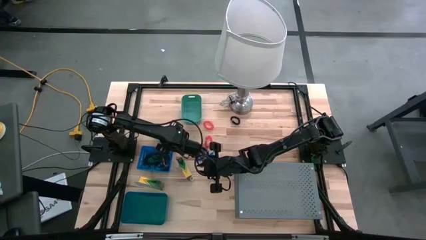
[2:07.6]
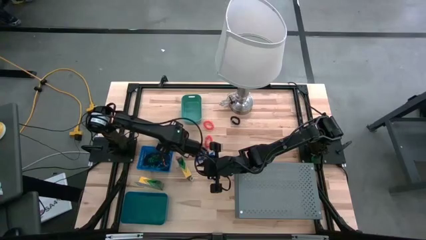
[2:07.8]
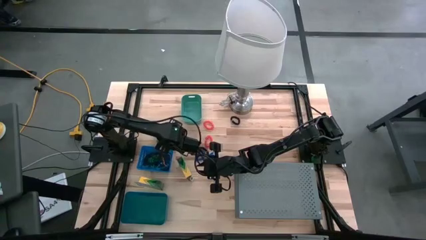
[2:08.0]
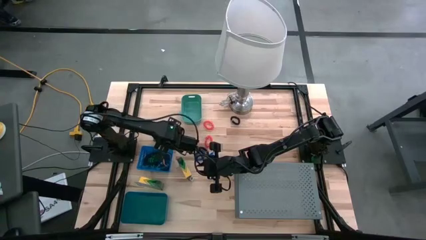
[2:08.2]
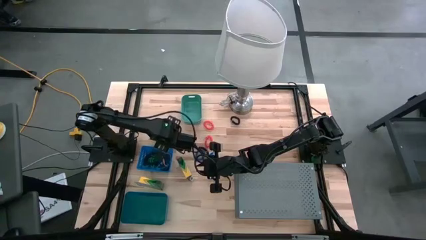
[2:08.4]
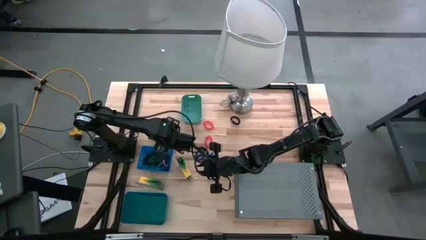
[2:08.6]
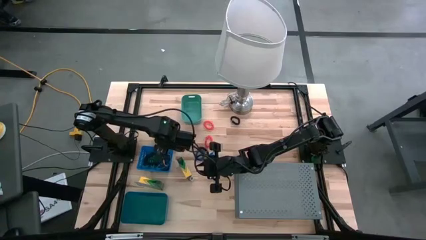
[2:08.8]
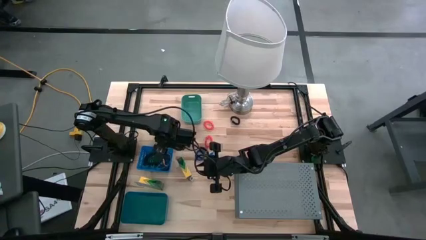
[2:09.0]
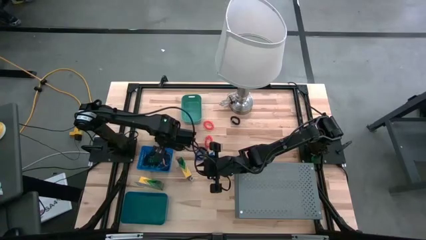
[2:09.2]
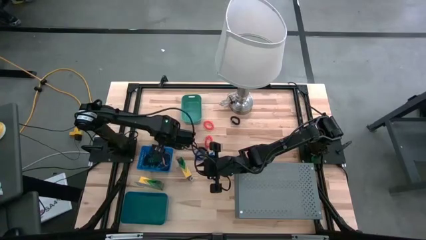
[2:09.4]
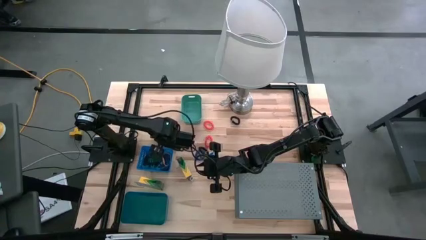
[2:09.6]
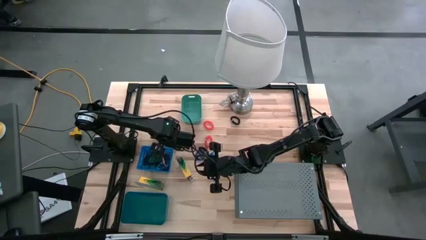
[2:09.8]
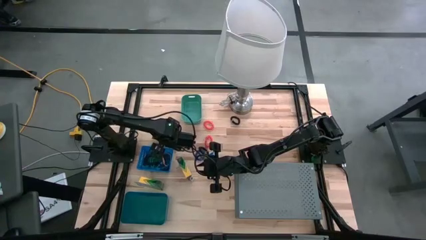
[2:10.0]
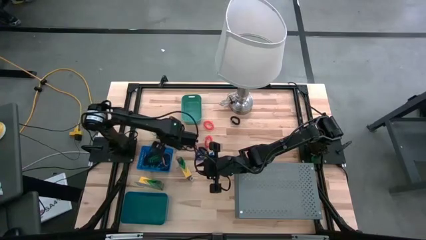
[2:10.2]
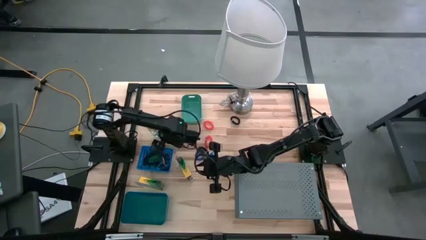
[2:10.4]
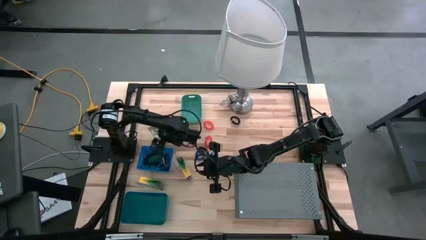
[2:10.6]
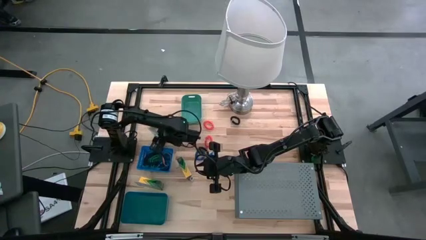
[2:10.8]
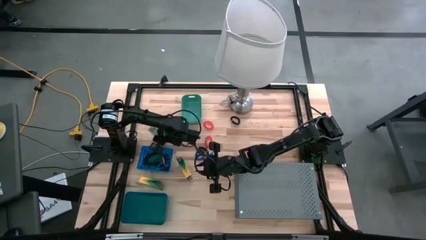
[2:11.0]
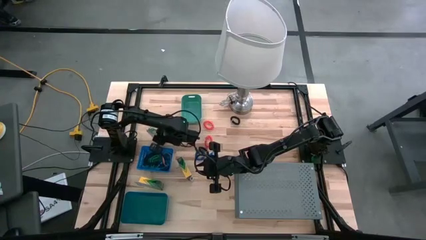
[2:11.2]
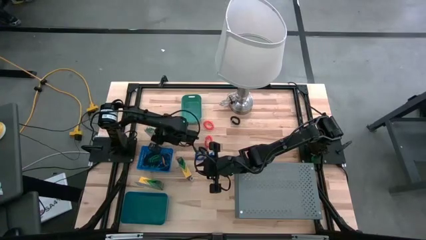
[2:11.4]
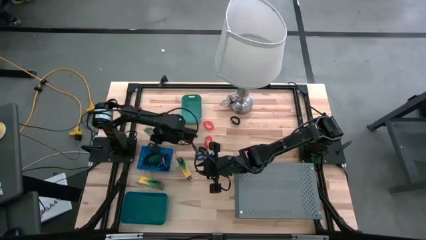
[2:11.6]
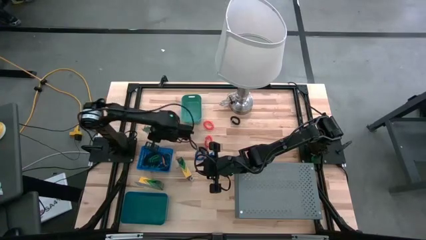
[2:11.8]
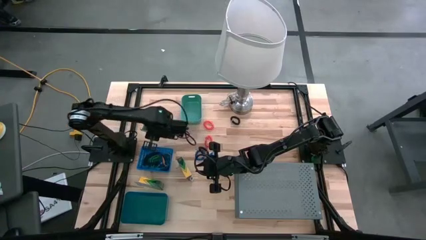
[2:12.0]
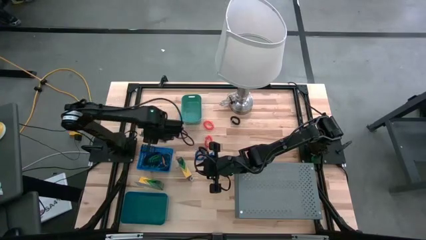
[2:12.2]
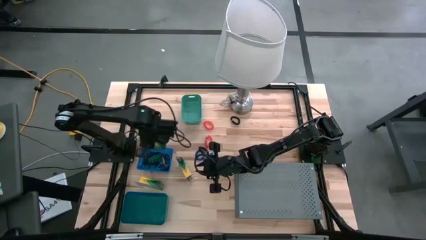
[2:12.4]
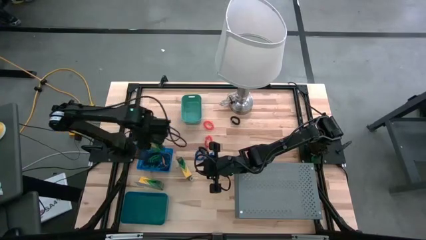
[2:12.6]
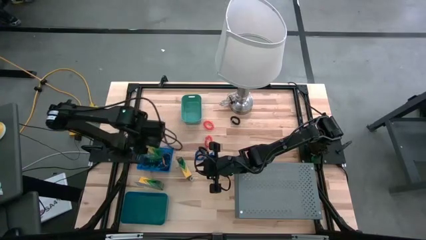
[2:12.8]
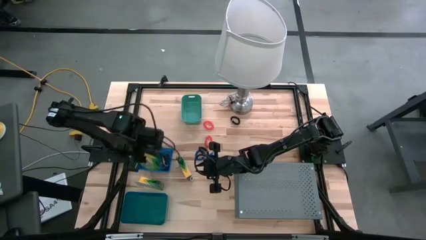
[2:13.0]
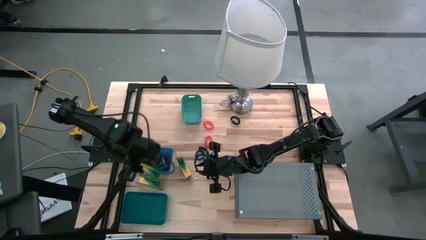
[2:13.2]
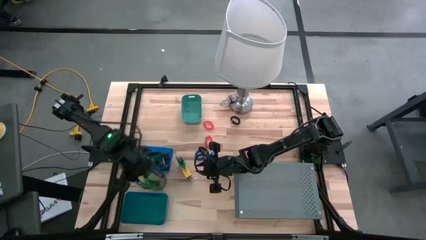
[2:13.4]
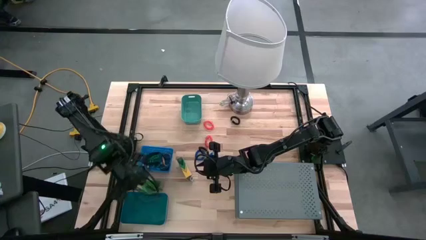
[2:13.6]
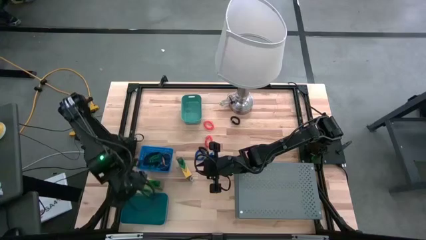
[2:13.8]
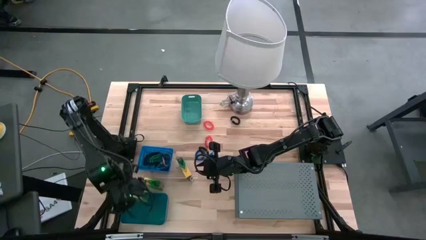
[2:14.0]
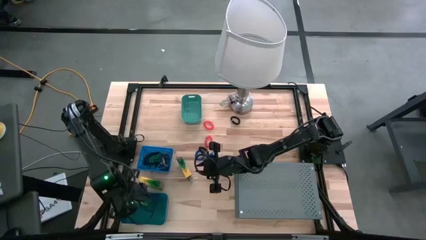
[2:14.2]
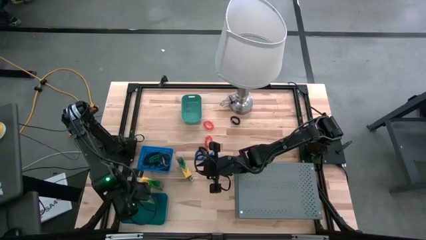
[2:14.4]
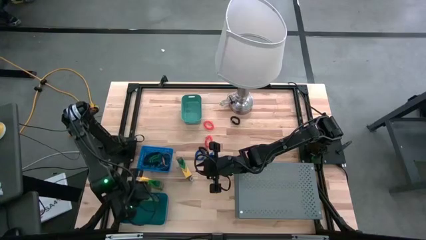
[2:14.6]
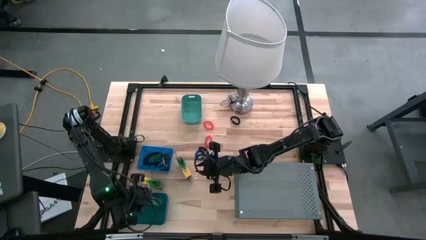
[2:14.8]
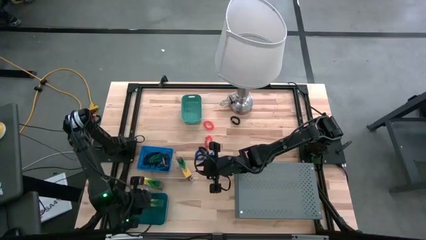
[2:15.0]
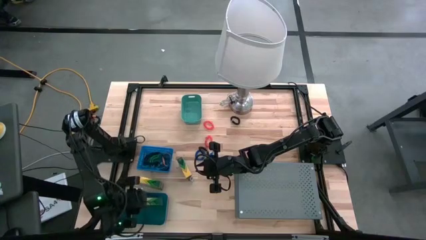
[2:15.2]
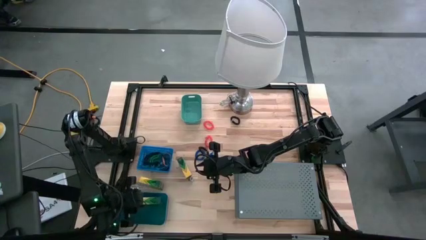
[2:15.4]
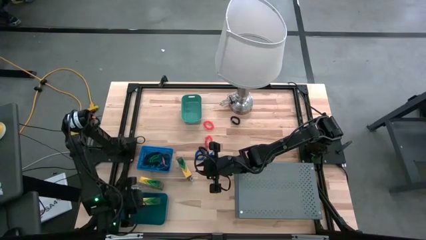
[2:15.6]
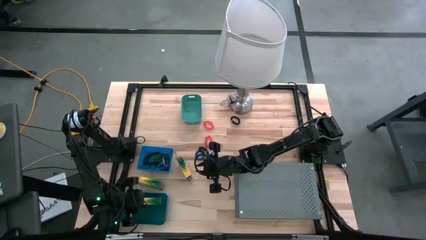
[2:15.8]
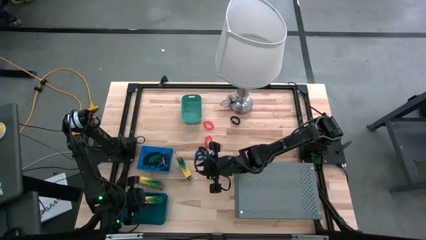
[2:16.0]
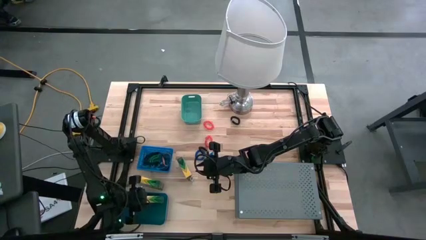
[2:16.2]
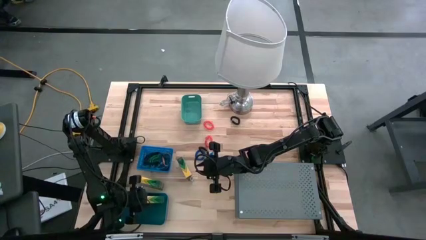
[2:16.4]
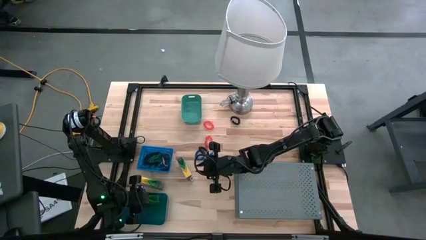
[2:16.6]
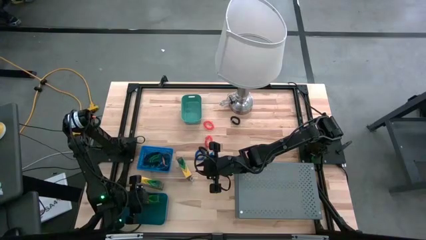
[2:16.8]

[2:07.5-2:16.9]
Task: Pick & Place Office Desk Supplies
Put the top pack of crayons into the bottom blue bin

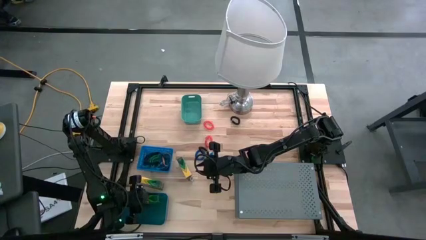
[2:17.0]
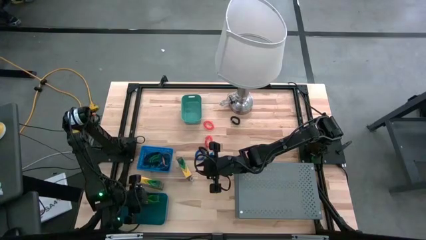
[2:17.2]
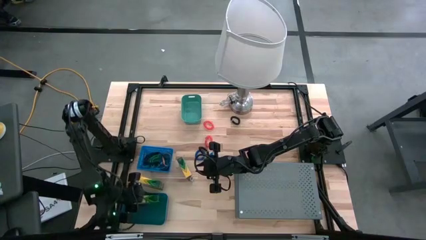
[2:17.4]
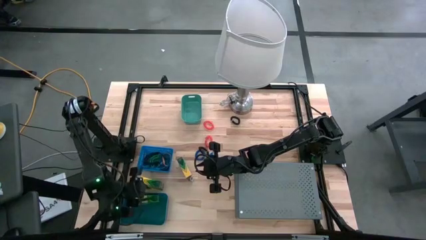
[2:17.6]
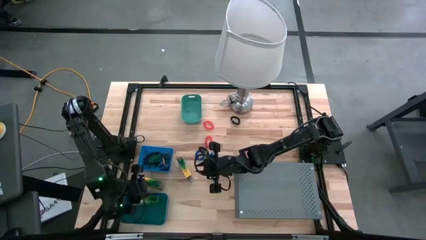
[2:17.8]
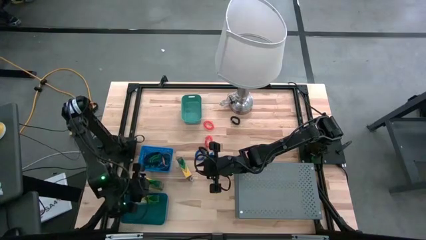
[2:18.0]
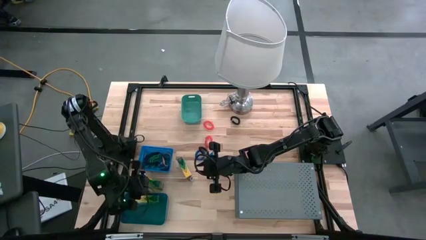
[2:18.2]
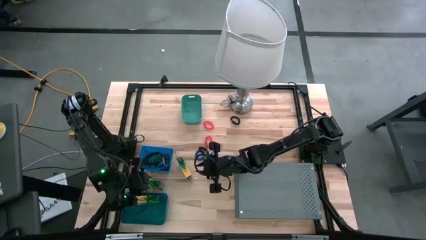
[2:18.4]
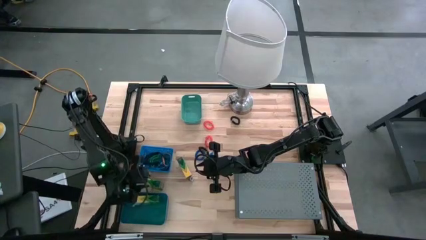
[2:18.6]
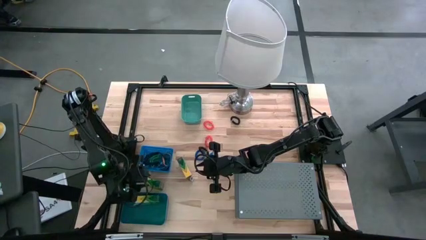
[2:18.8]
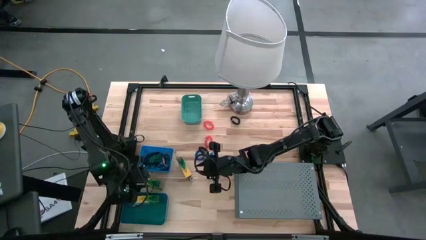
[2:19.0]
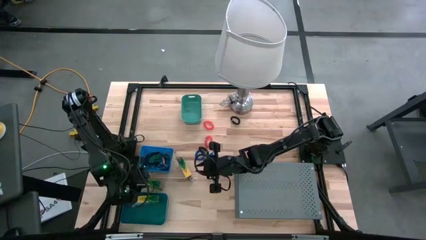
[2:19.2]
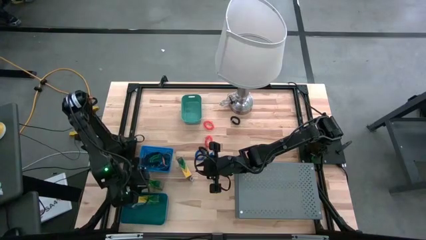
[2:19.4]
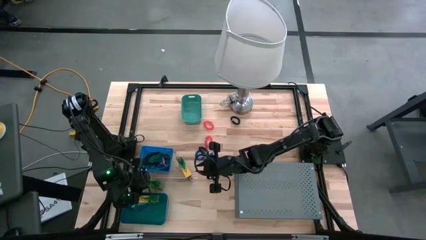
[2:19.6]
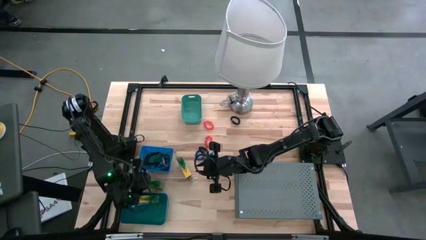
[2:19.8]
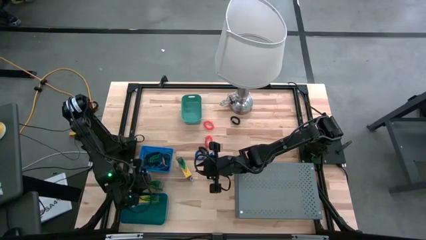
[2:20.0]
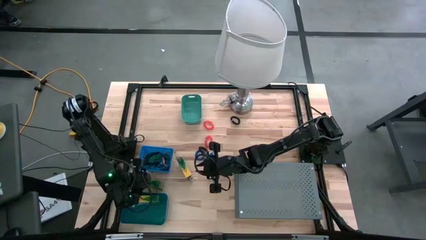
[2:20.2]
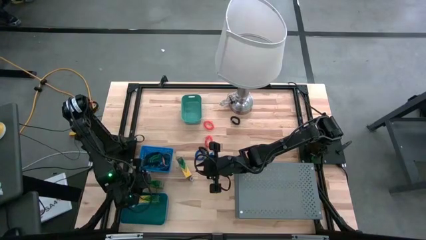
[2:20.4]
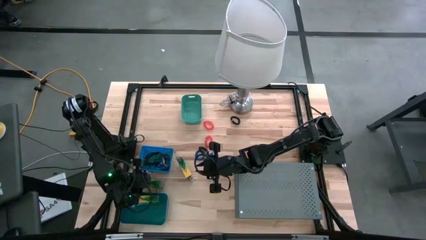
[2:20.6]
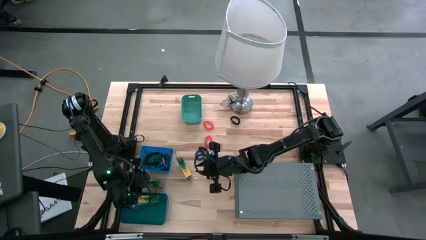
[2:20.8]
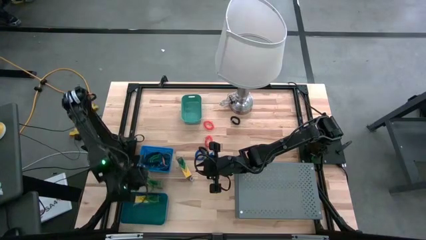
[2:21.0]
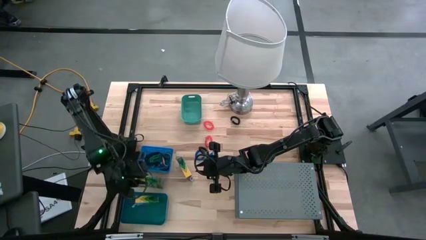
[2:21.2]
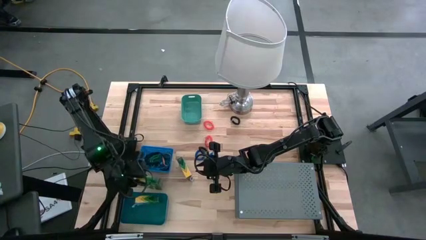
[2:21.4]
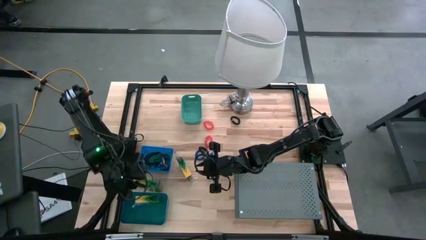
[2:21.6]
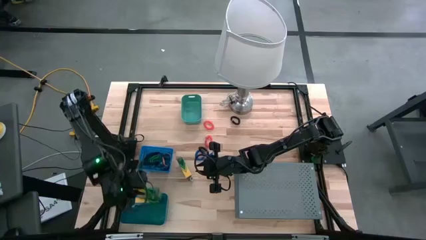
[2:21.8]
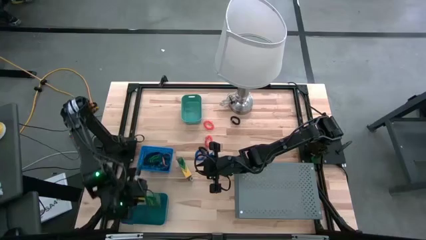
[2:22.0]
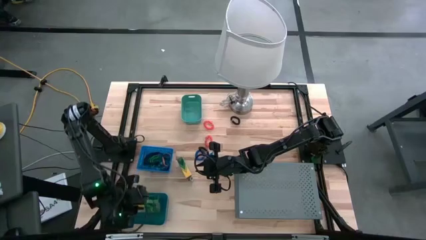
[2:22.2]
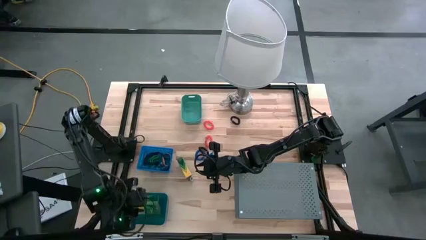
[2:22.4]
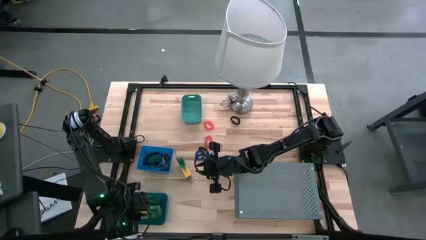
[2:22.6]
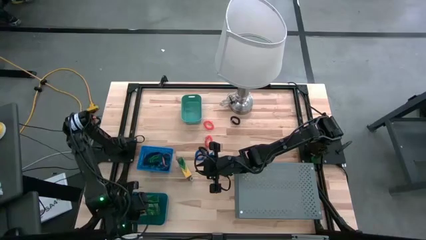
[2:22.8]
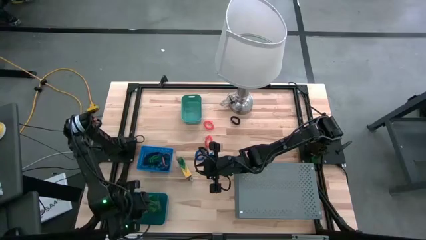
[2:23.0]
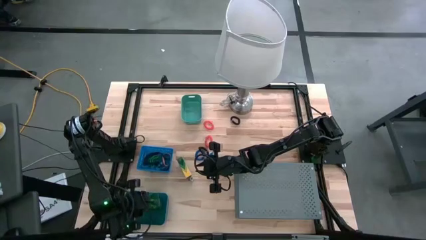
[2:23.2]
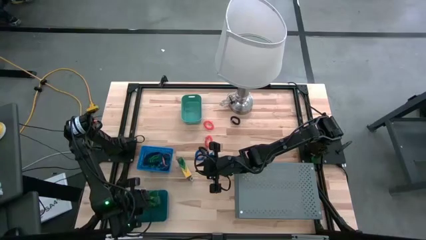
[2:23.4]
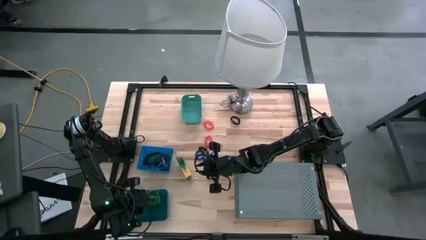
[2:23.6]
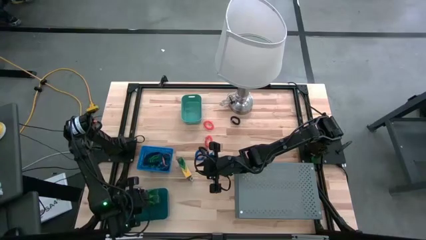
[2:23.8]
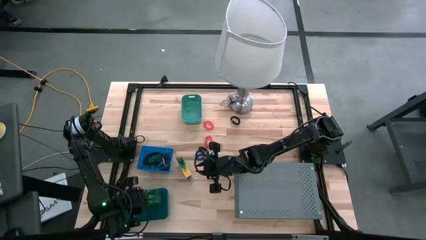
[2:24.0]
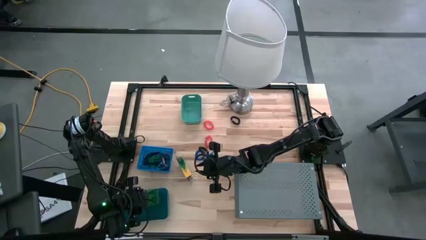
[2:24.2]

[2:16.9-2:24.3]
Put the pack of crayons into the bottom blue bin
